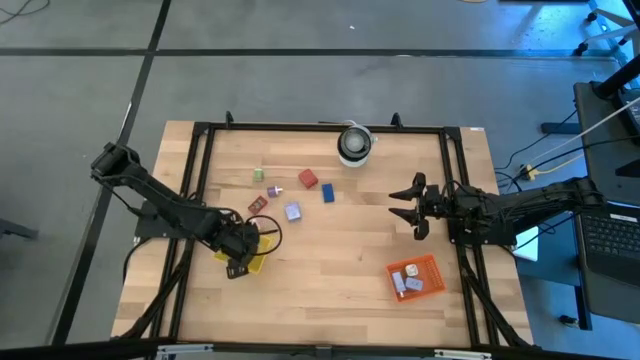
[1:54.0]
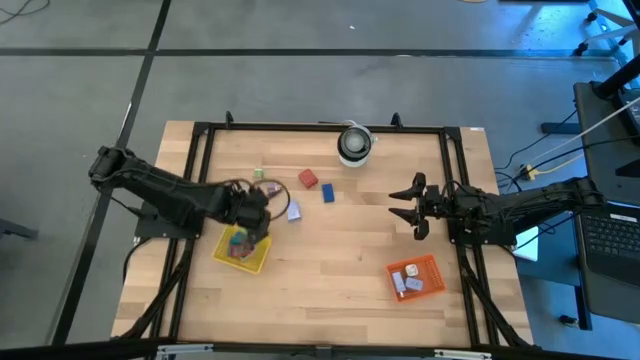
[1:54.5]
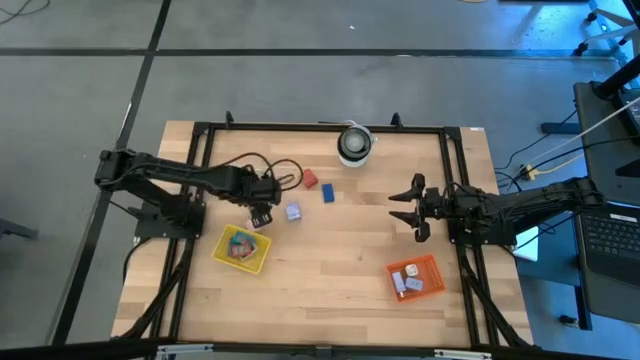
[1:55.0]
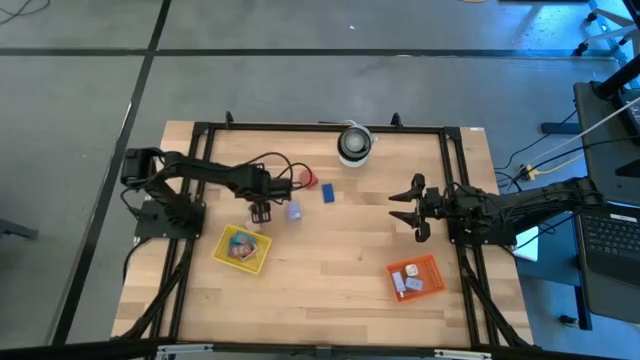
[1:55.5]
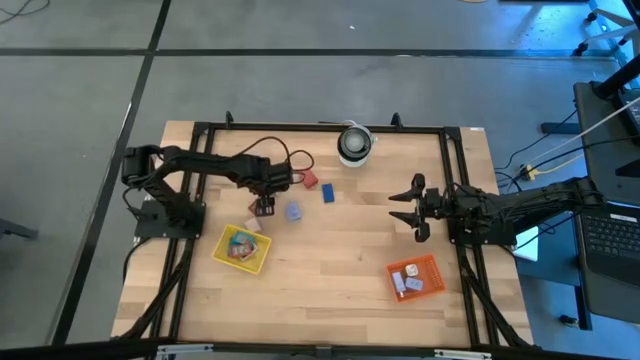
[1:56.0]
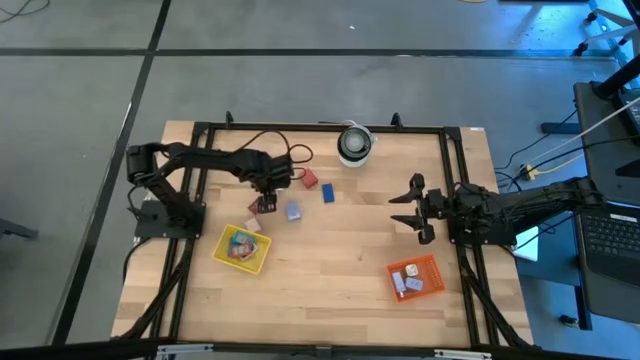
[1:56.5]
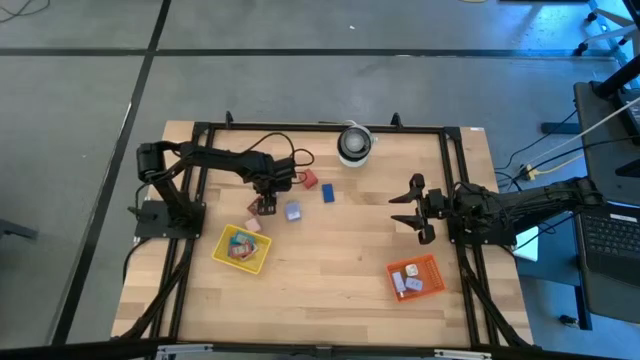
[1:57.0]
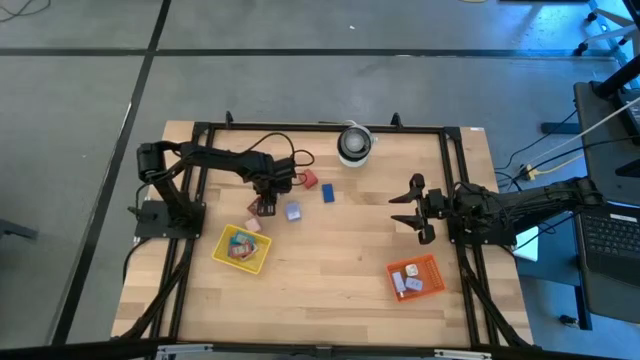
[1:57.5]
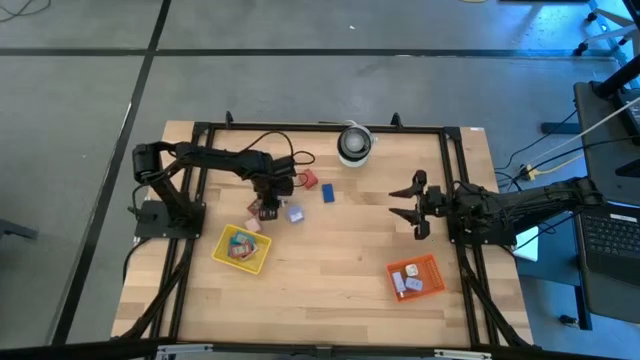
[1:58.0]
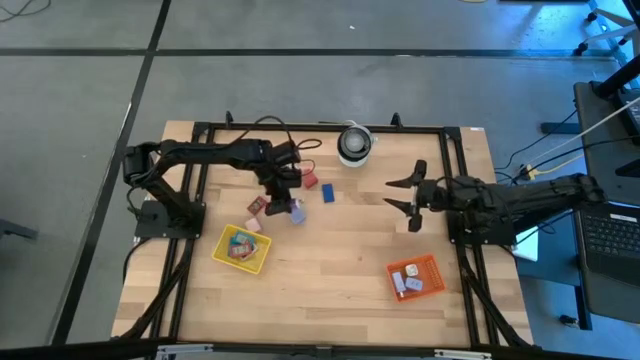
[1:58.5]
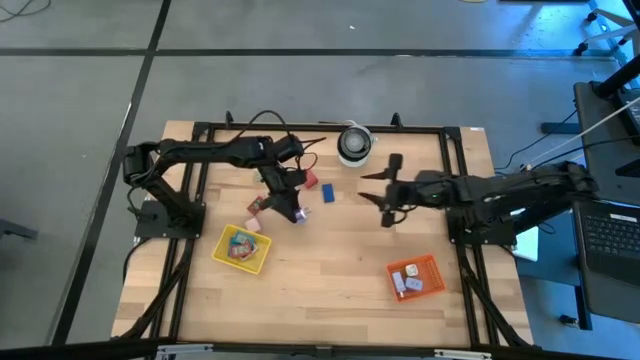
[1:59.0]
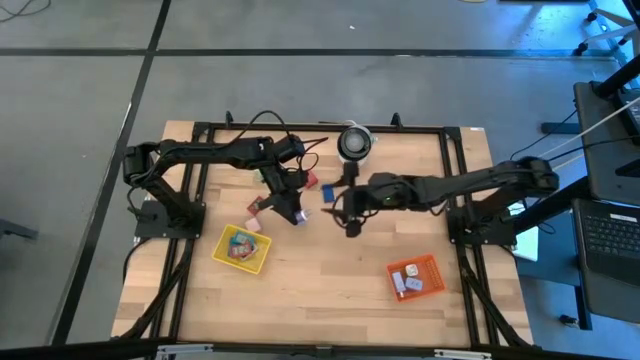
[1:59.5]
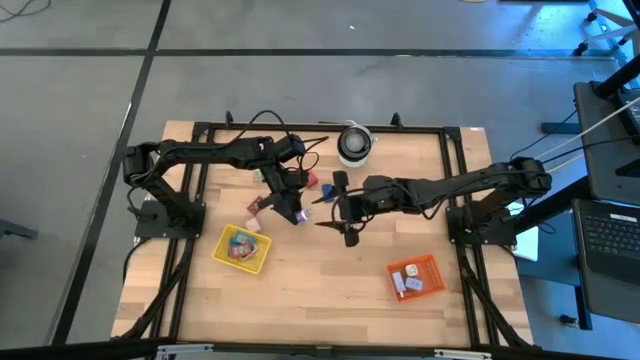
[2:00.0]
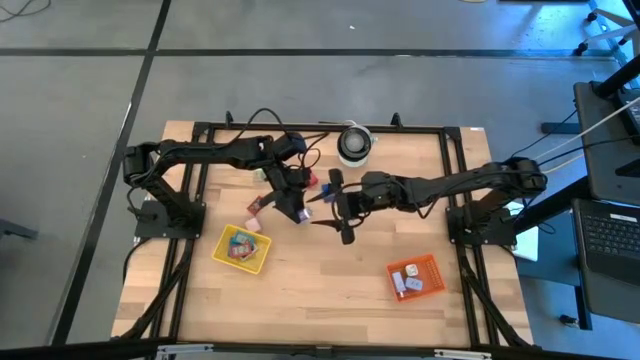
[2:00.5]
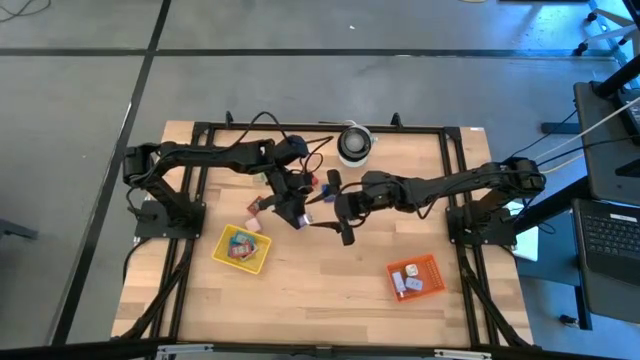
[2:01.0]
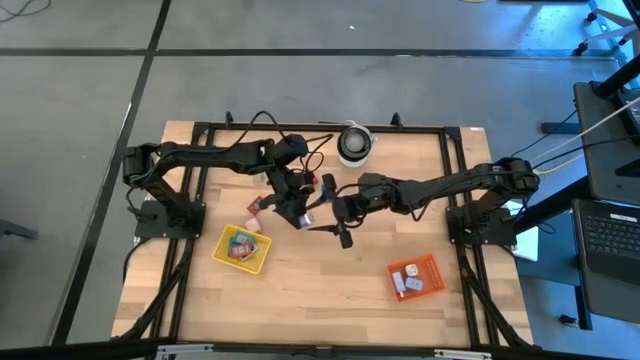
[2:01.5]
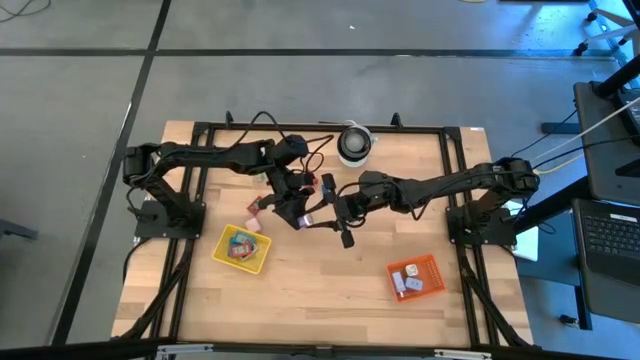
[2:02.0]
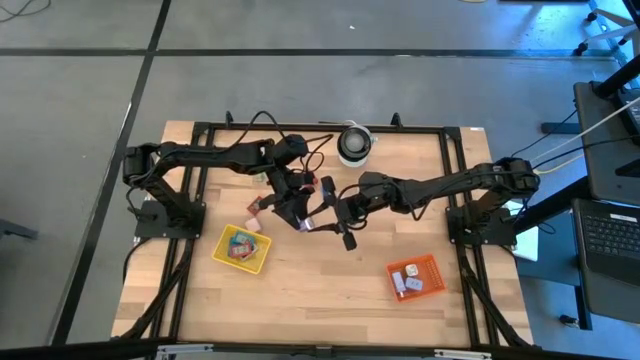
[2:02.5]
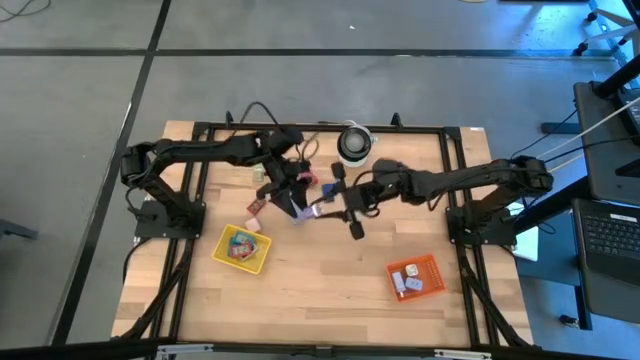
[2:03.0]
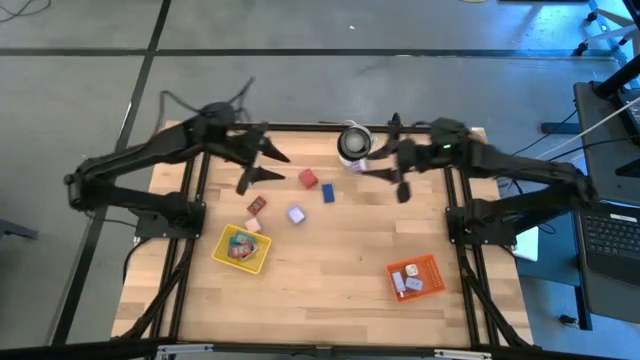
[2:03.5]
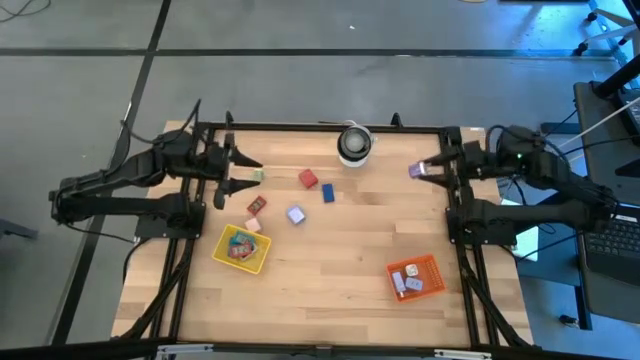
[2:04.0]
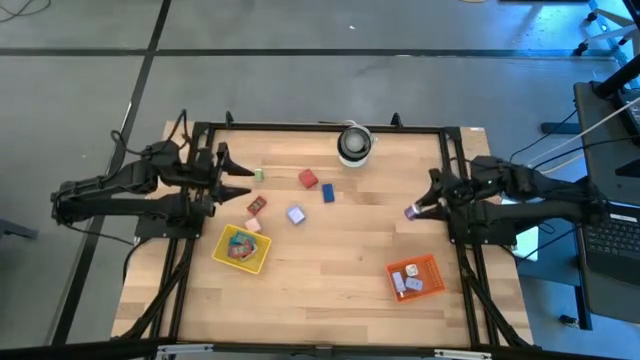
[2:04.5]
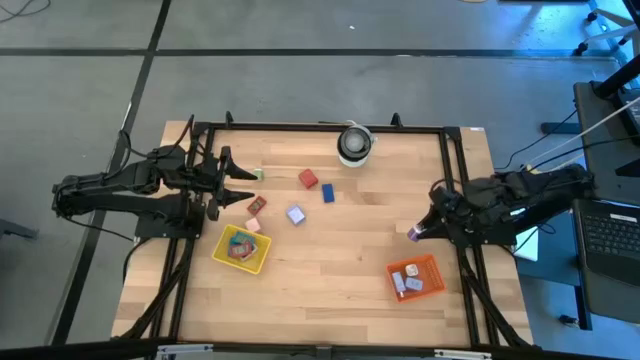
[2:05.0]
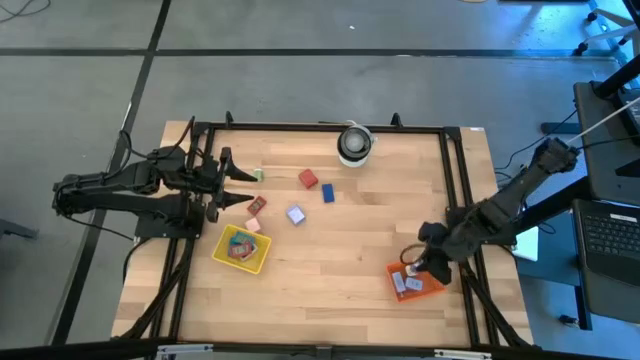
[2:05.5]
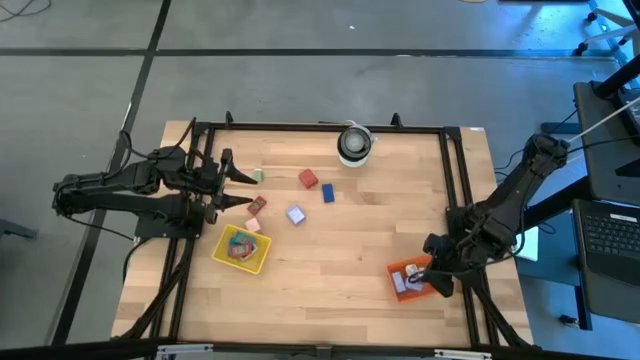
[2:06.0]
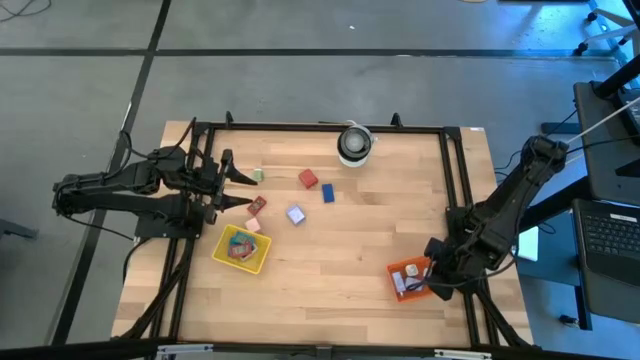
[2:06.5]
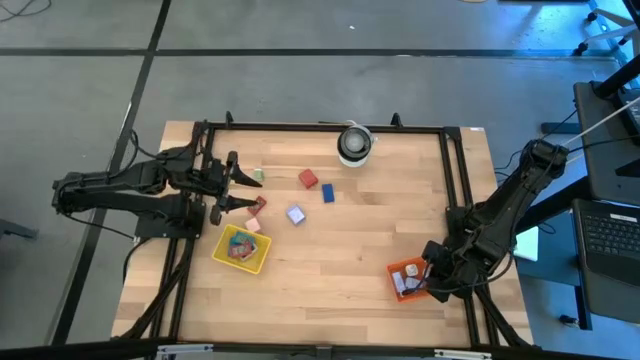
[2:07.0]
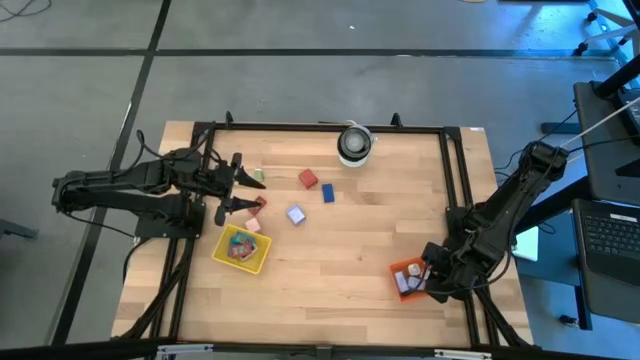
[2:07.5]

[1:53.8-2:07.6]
Task: Pick & Place Office items
Put the purple charger adapter into the orange bin
